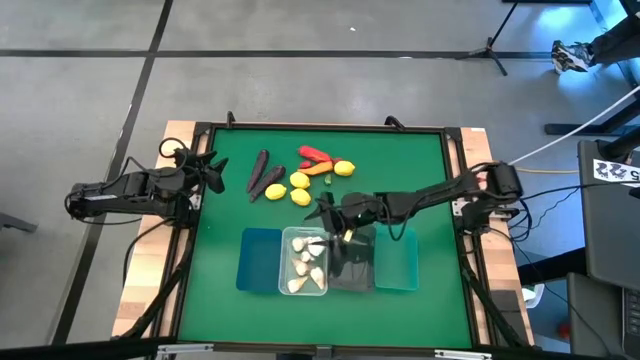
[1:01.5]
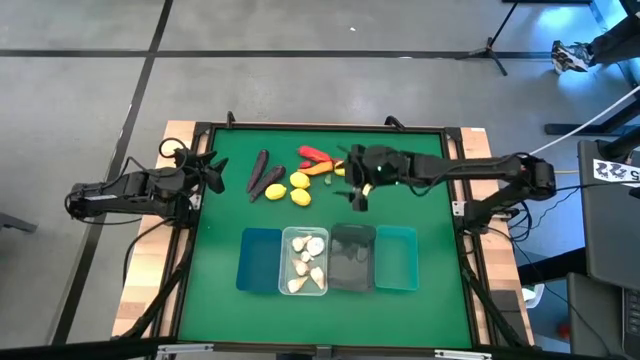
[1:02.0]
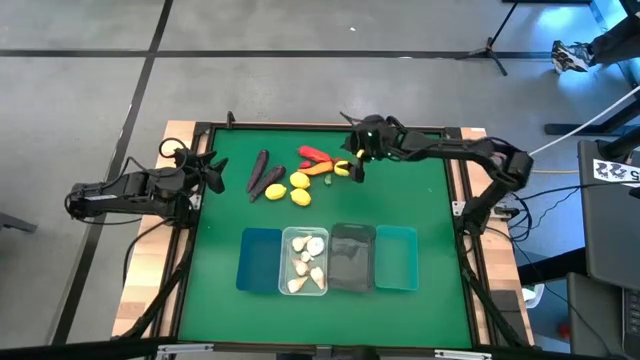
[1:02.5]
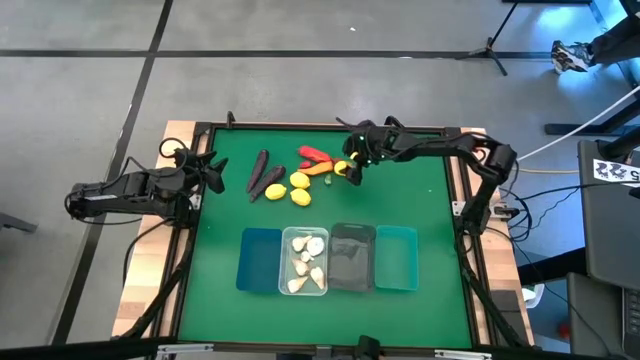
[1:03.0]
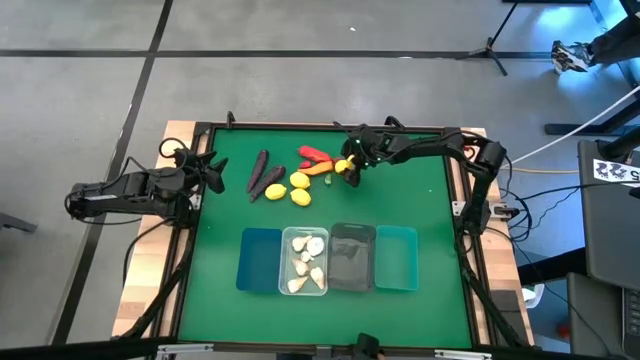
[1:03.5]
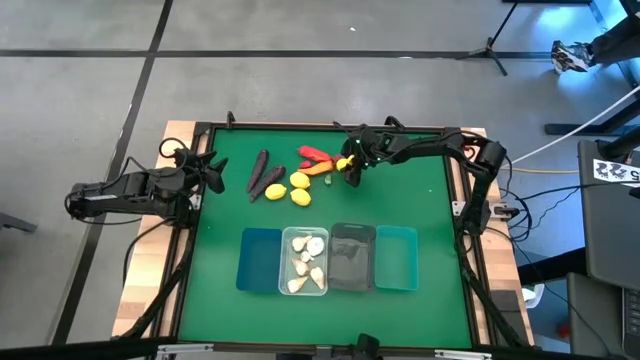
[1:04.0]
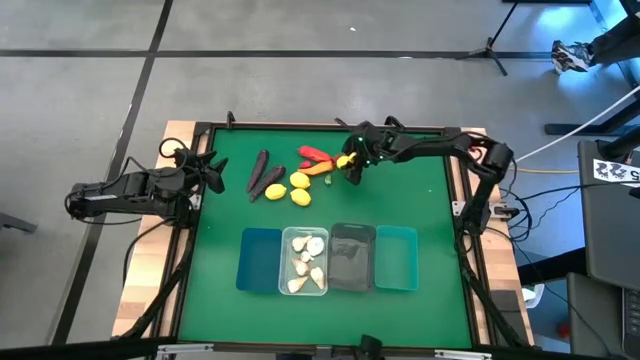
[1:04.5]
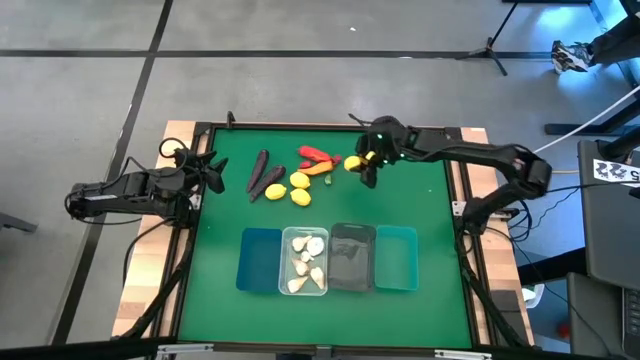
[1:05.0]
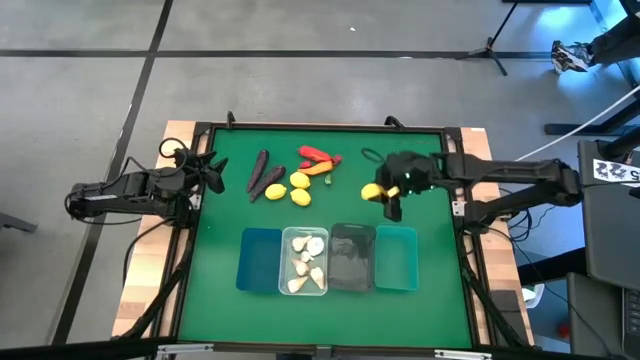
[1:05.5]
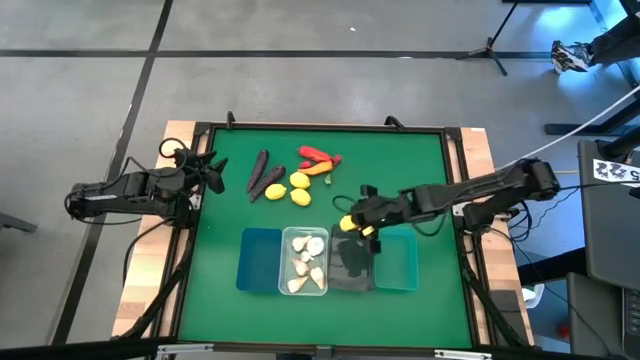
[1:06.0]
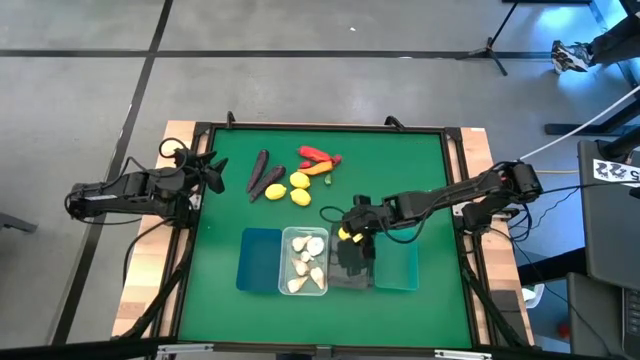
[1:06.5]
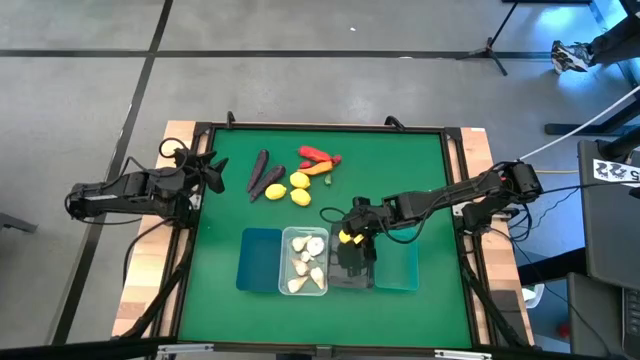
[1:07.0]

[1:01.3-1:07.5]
Task: Sort produce into baskets
Put the yellow lemon into the black bin

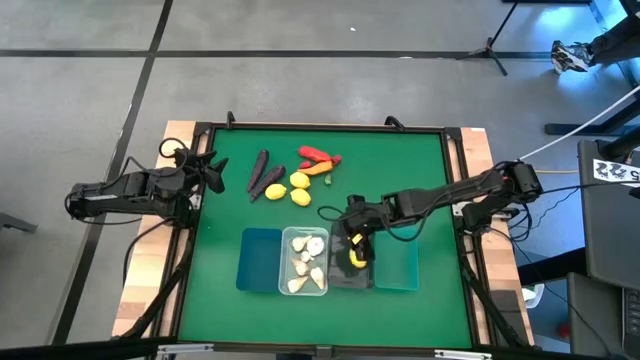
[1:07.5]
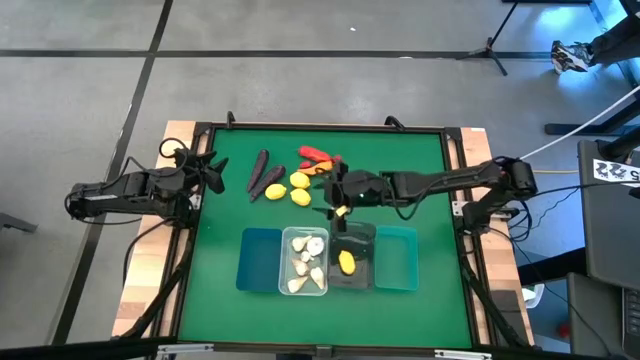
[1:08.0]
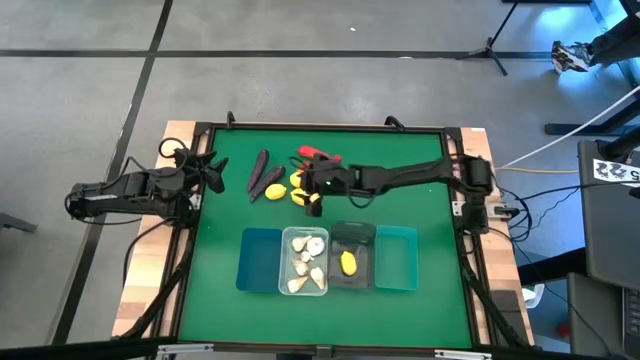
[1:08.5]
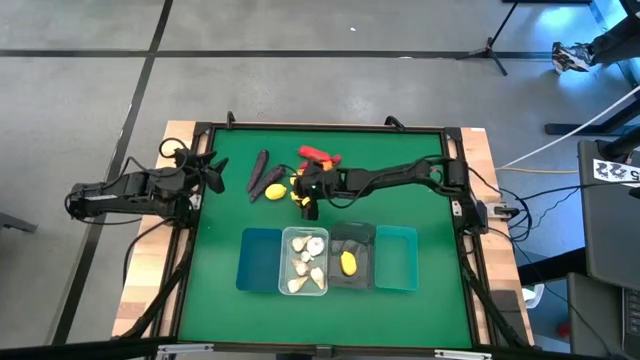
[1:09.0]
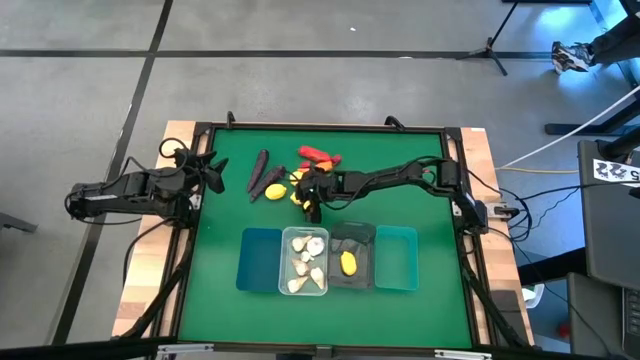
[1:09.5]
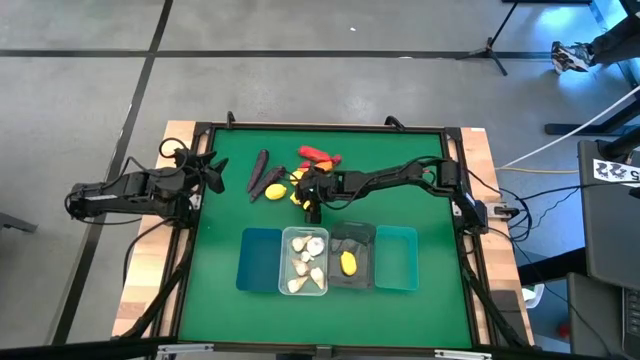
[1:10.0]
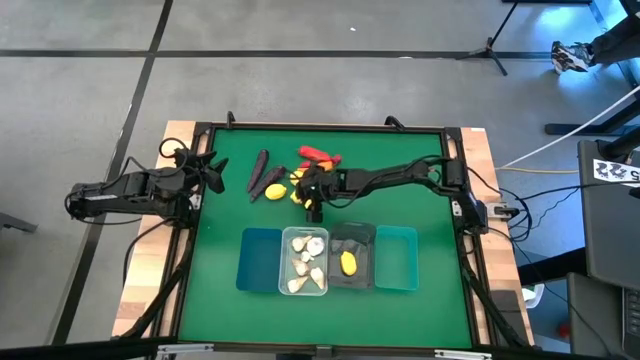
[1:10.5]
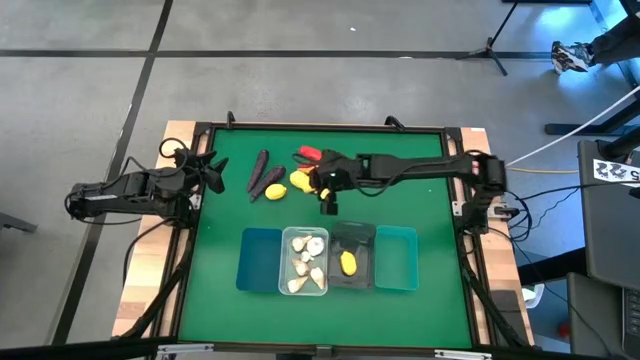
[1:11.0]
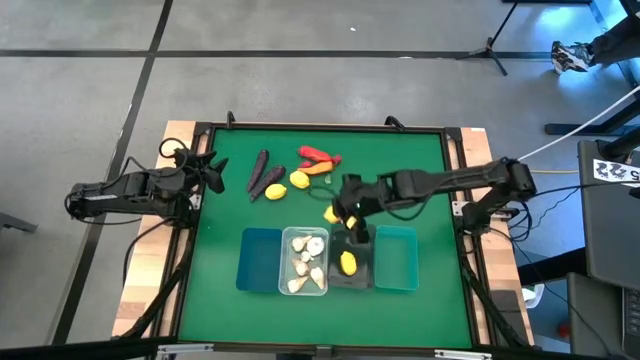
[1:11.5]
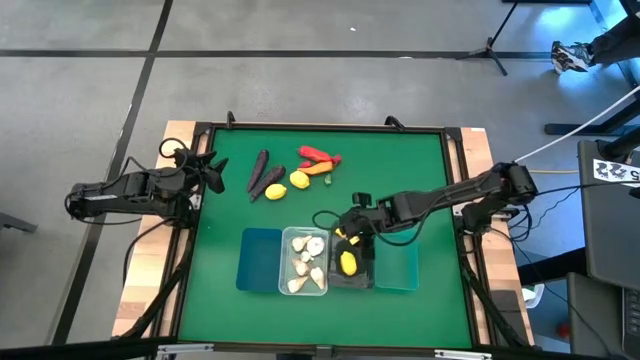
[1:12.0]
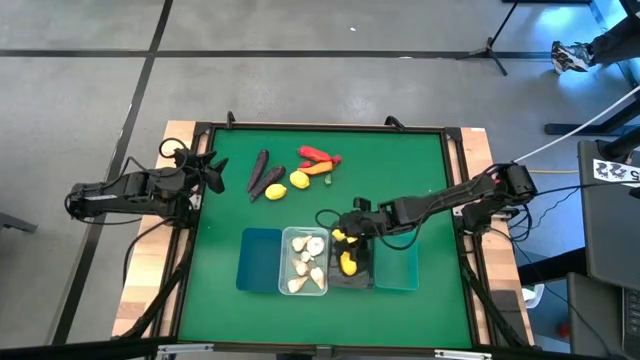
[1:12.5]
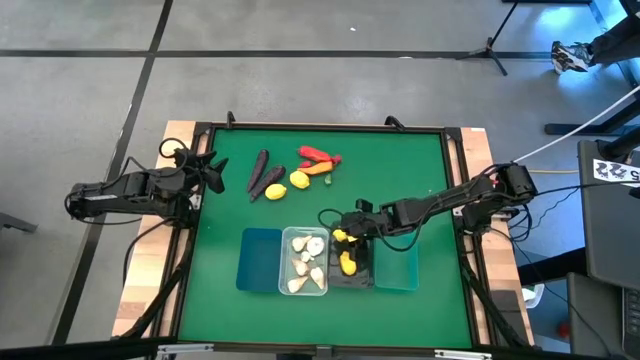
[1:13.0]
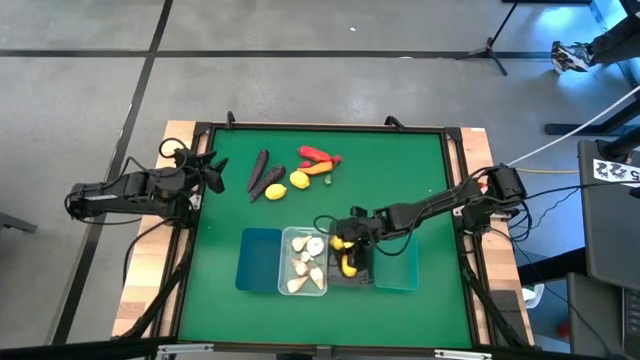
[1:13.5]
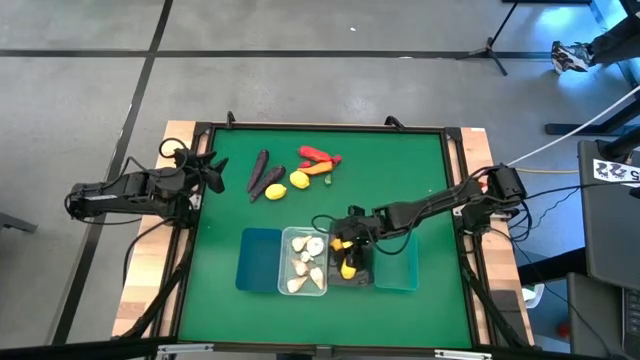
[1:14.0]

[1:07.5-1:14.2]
Put the yellow lemon into the black bin

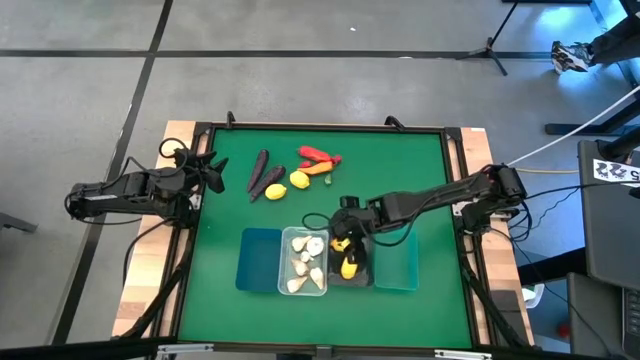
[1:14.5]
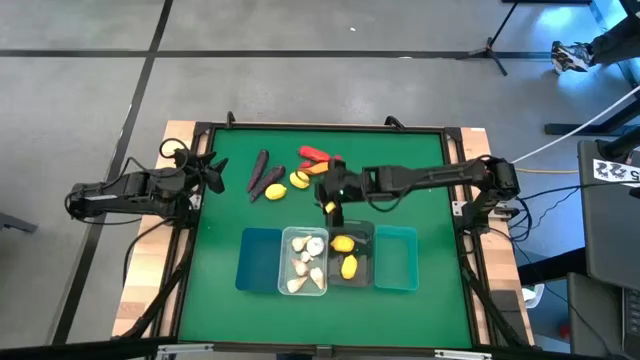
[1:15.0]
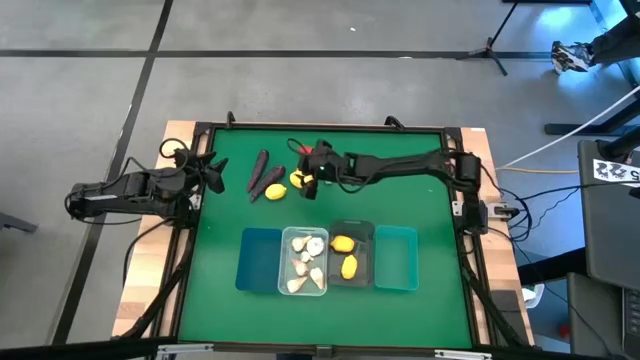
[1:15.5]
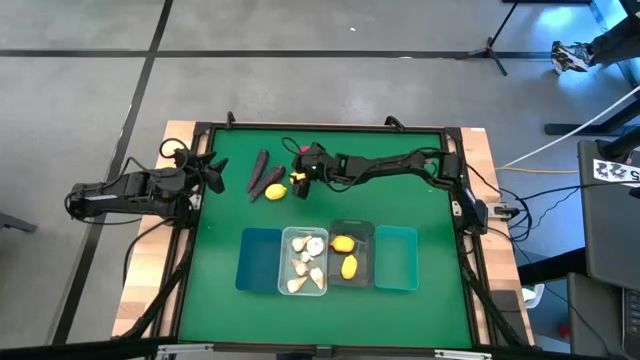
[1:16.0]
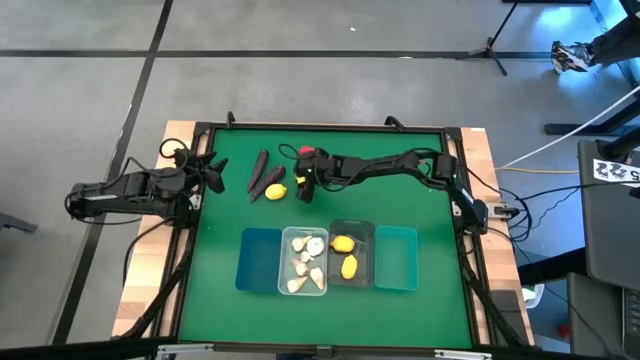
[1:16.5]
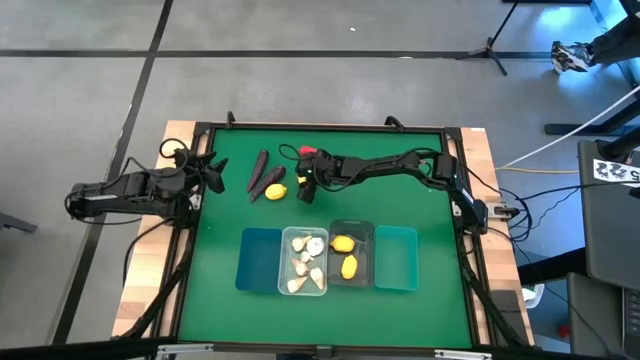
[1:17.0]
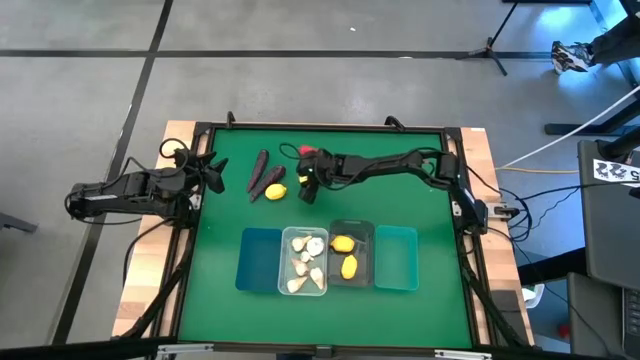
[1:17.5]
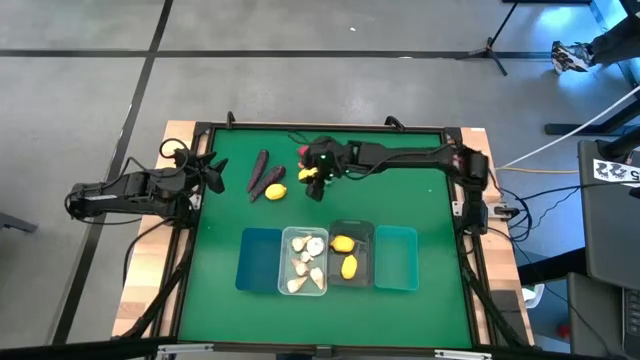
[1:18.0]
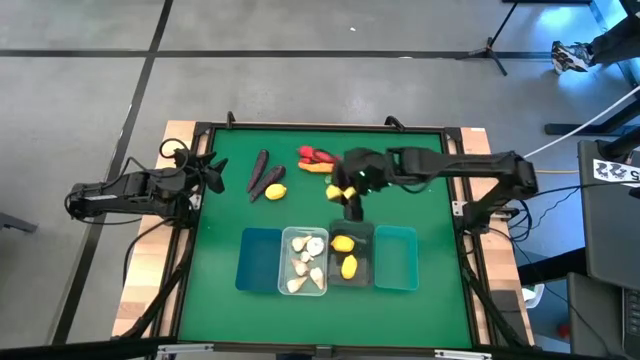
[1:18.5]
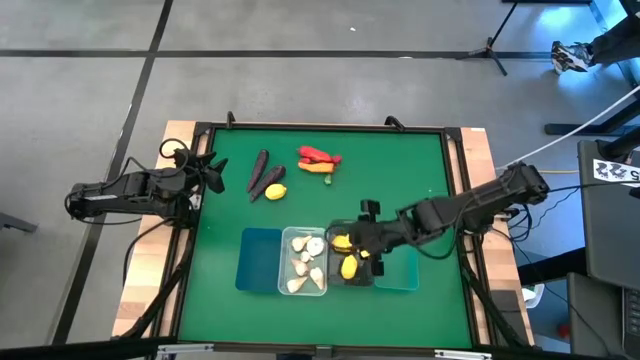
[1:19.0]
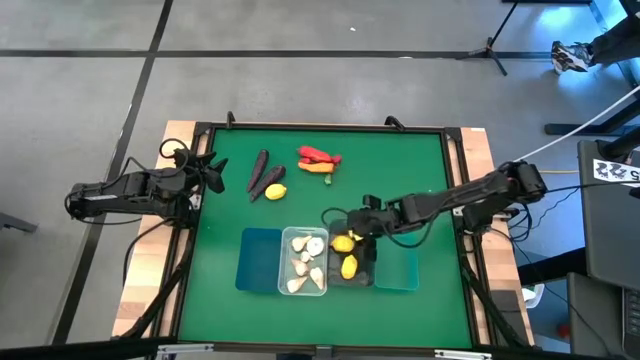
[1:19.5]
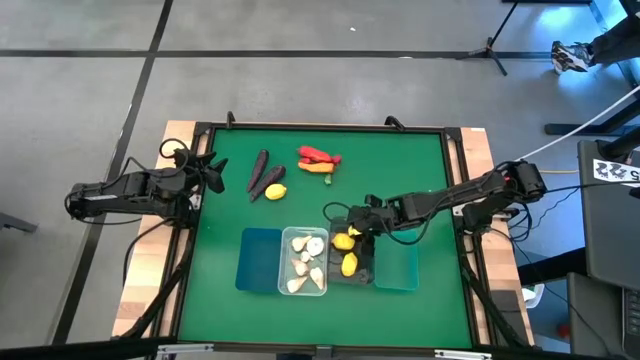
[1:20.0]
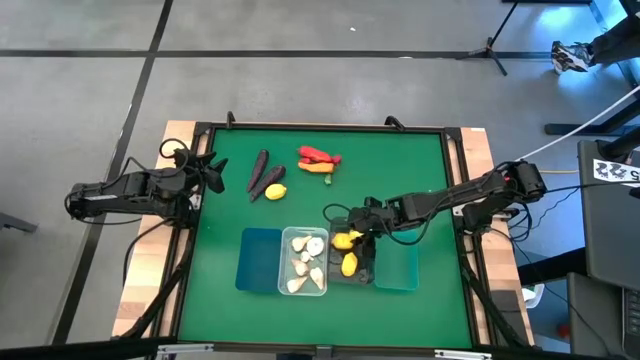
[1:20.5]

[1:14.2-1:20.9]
Put the yellow lemon into the black bin
